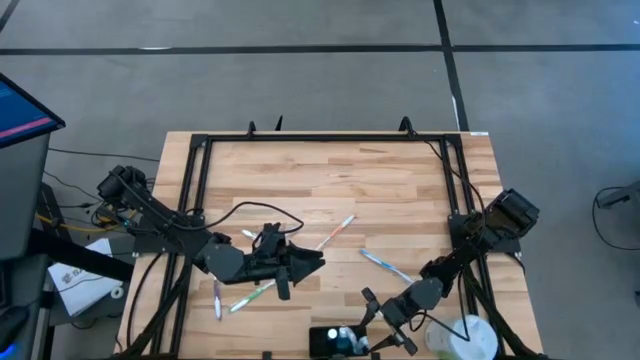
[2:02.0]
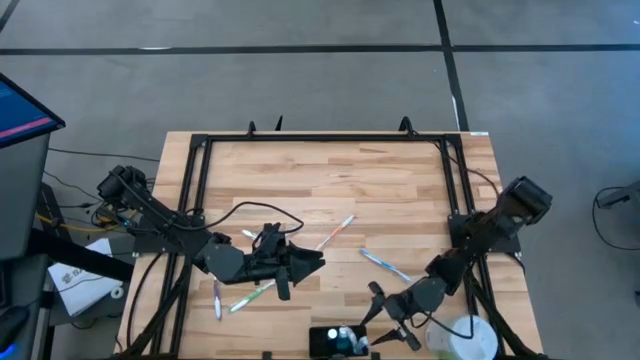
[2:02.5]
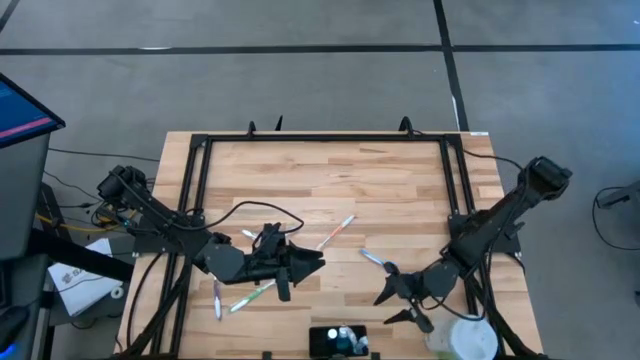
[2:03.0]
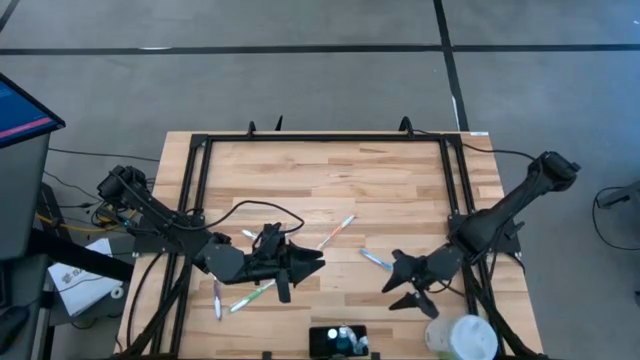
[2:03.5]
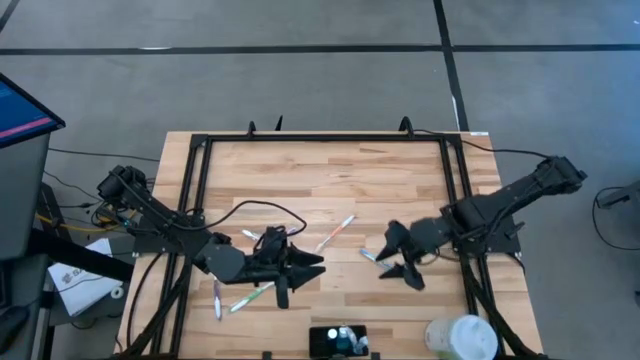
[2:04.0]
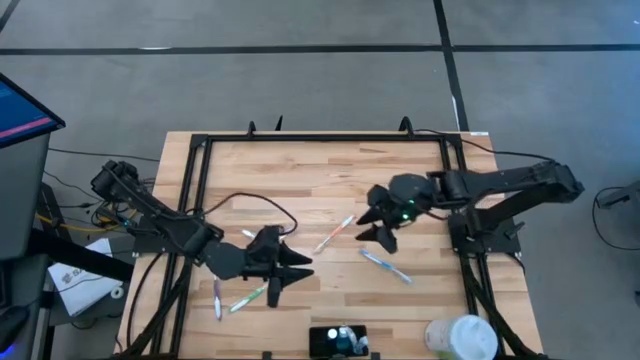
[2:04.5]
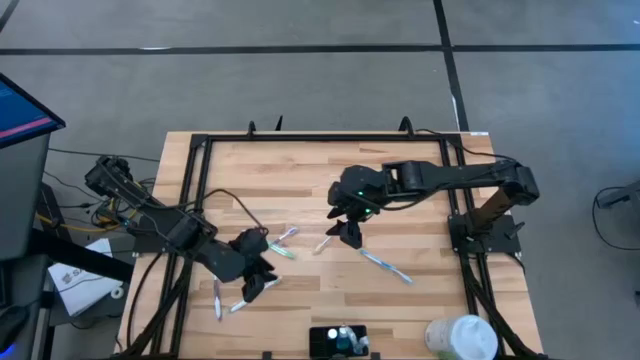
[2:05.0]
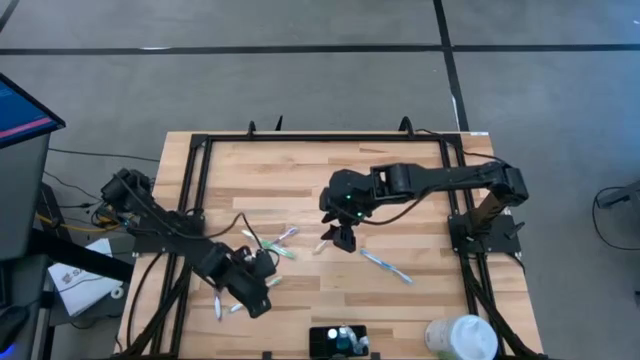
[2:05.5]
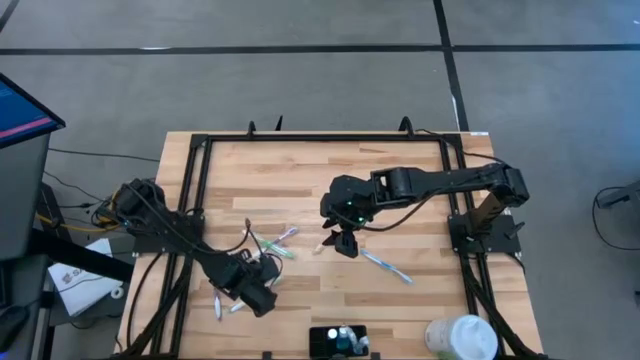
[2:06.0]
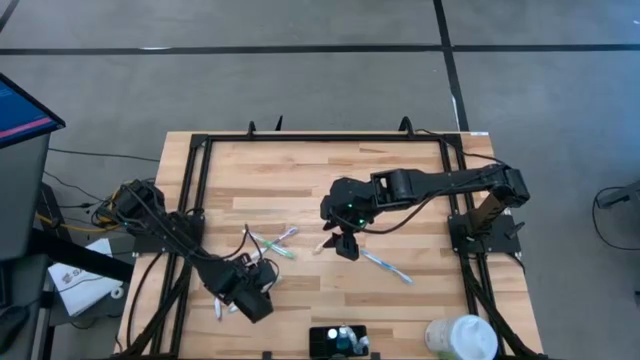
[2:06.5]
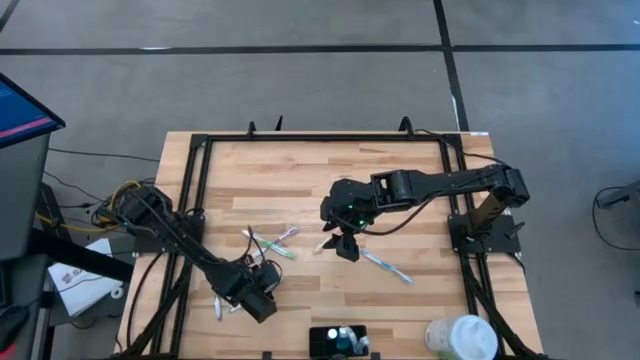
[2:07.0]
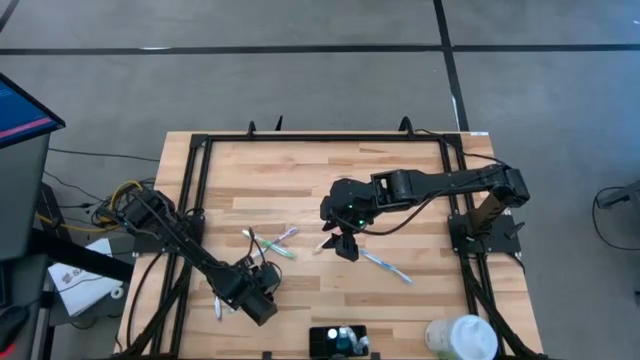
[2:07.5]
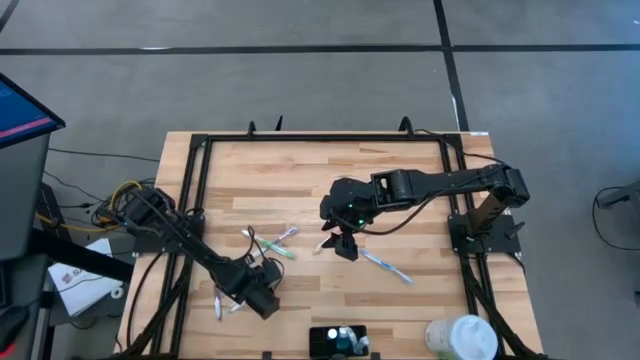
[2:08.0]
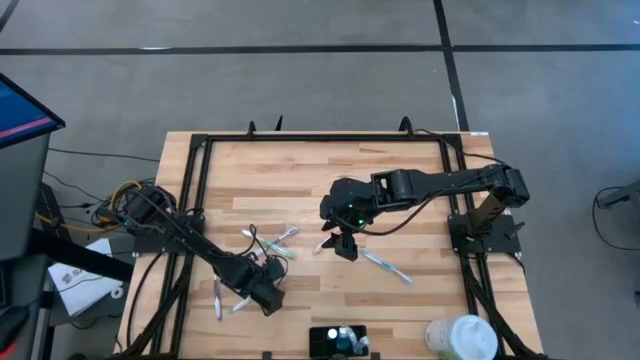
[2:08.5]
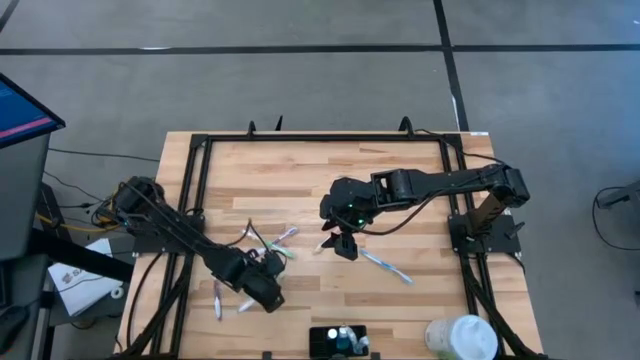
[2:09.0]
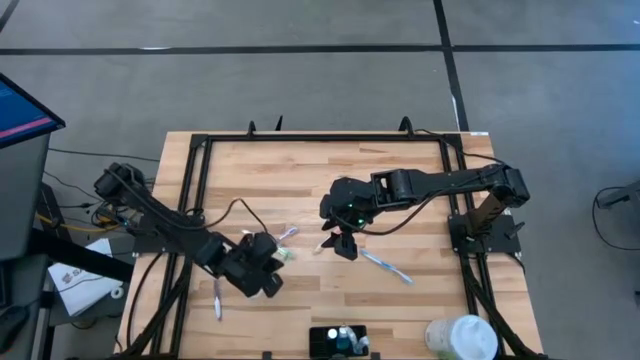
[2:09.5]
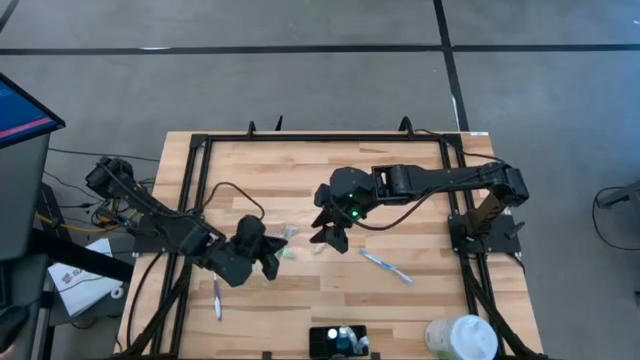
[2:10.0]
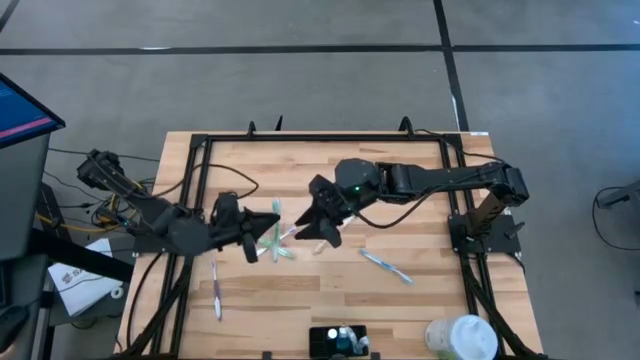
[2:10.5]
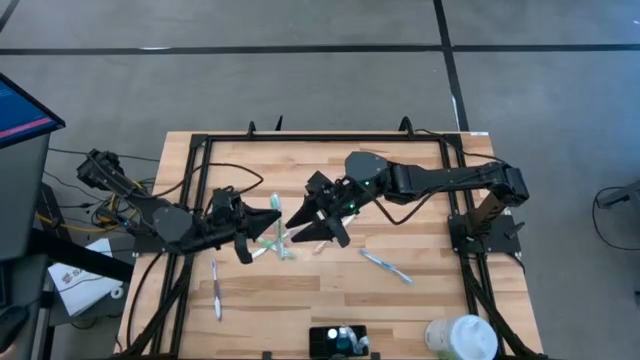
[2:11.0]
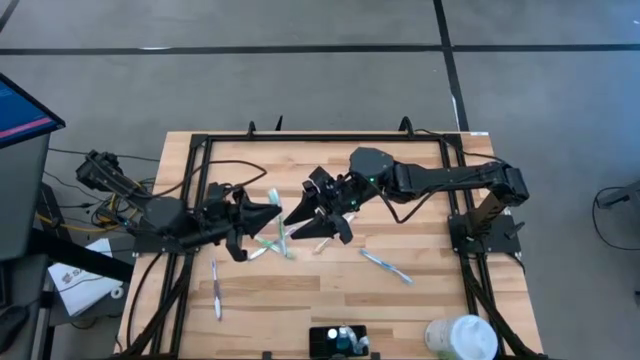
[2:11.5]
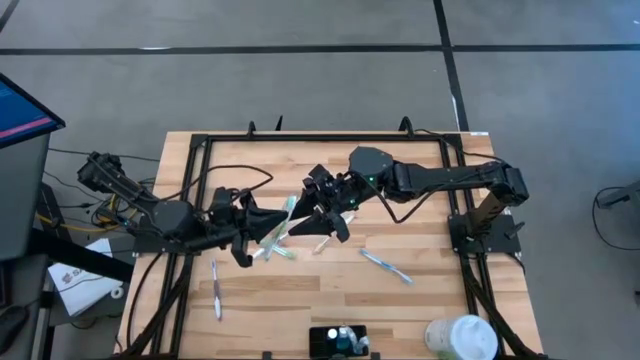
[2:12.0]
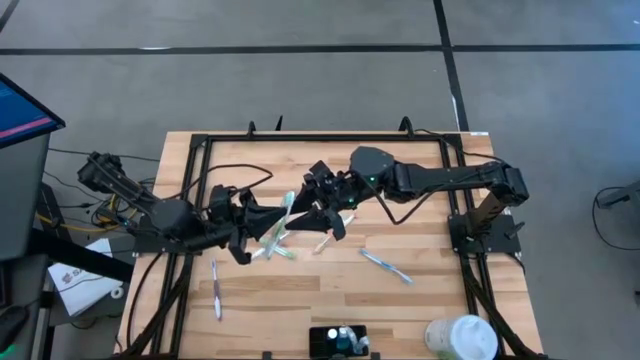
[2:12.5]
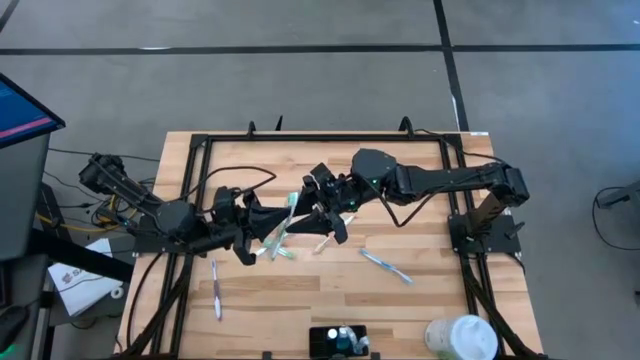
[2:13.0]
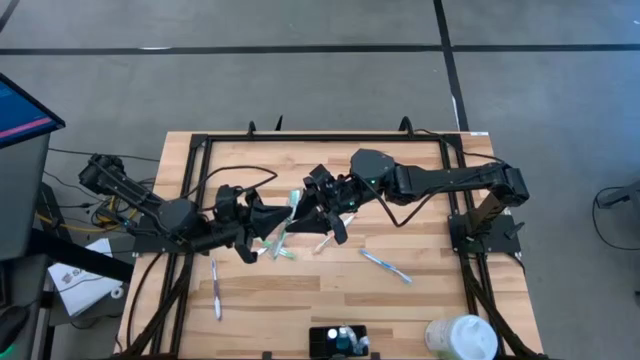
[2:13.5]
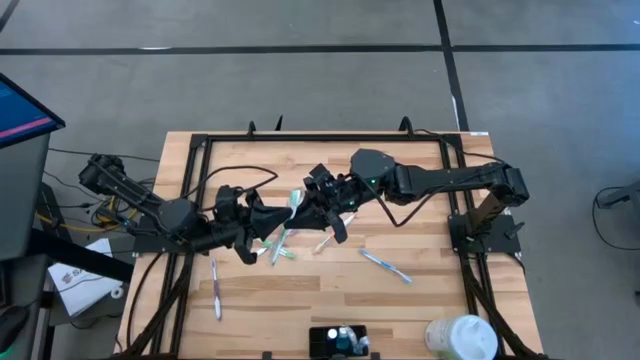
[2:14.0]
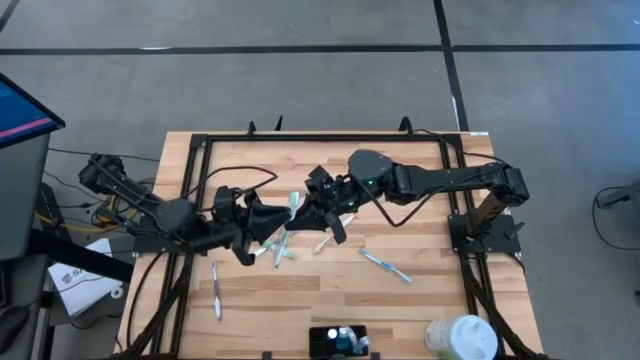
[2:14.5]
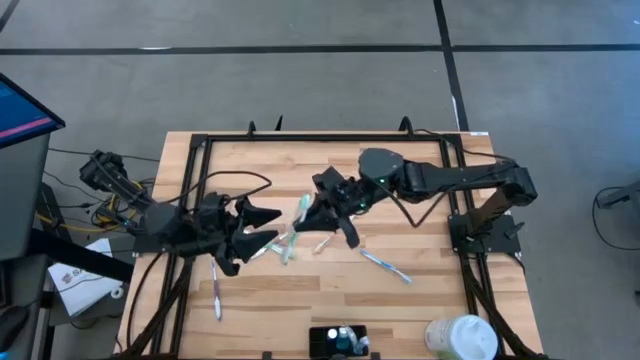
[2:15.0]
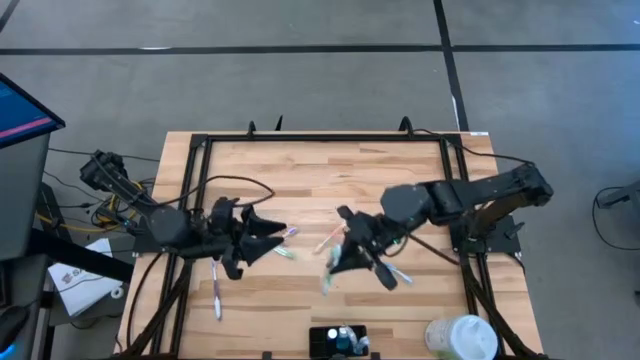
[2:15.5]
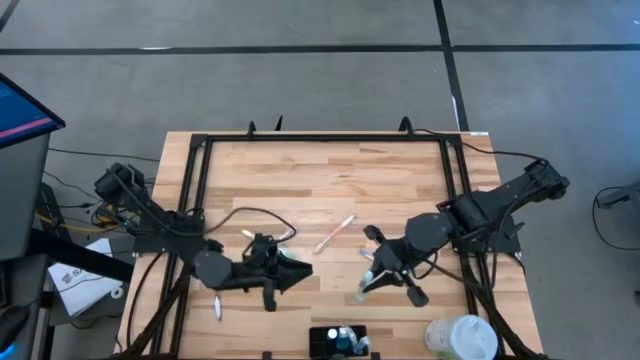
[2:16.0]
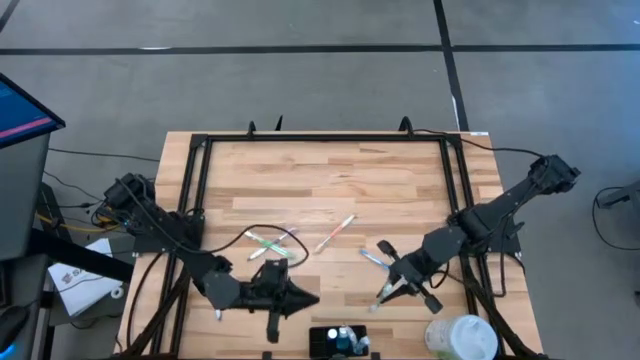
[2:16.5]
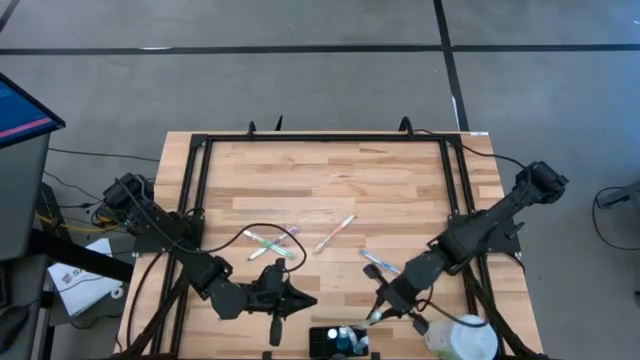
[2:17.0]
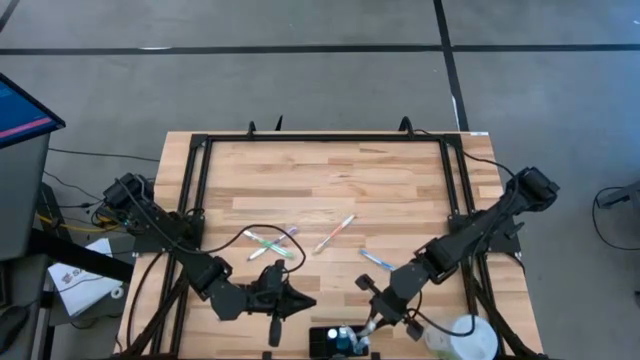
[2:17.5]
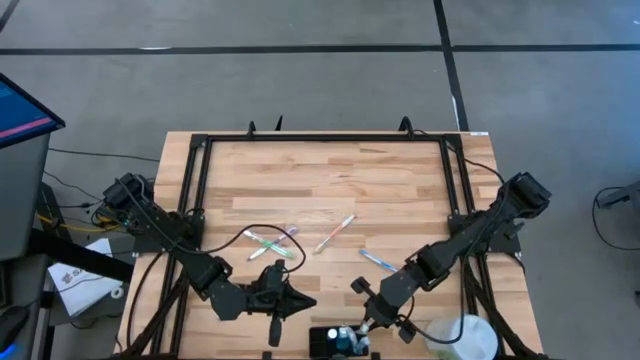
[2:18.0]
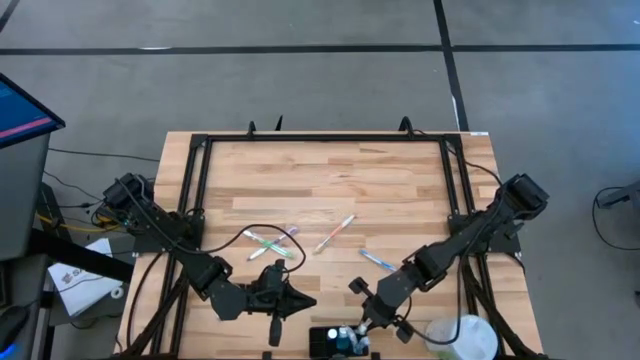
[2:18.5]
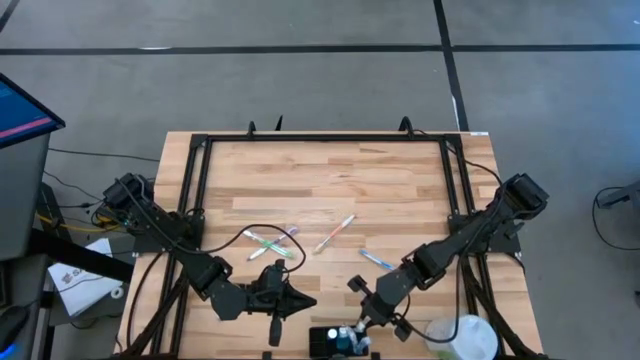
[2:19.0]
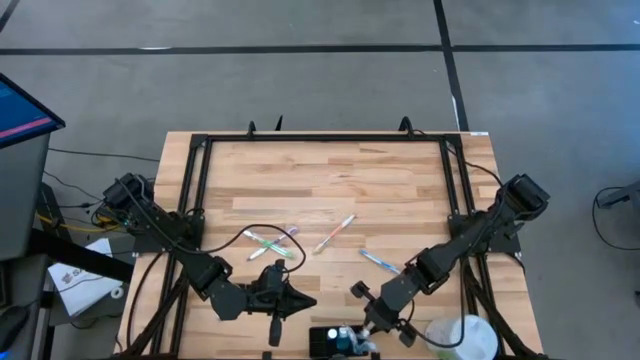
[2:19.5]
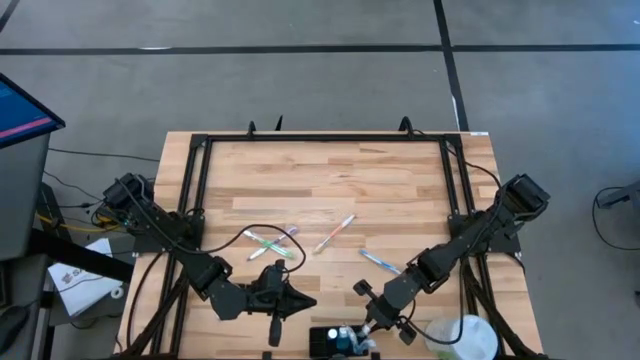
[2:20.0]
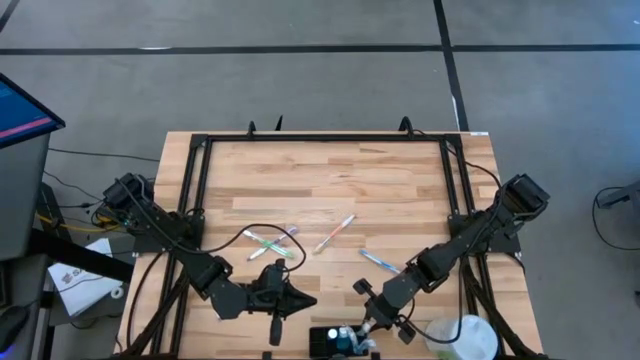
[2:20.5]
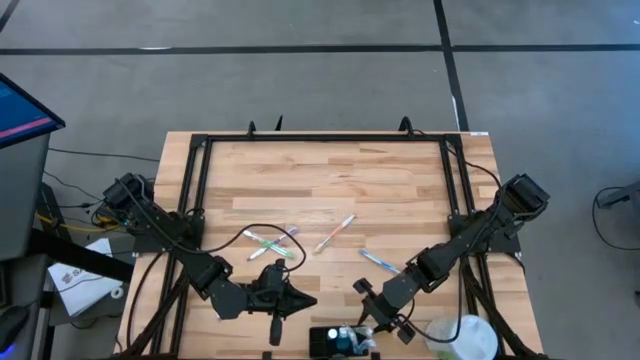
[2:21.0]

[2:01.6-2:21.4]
Task: Pick & Place toothbrushing station
Put the bottom green toothbrush into the black mesh organizer
